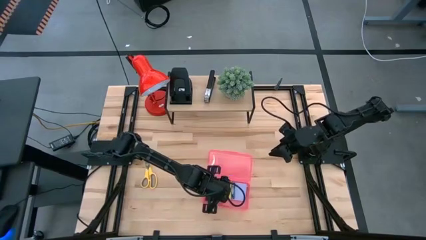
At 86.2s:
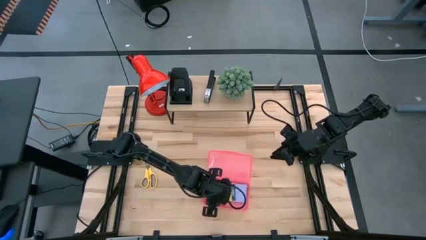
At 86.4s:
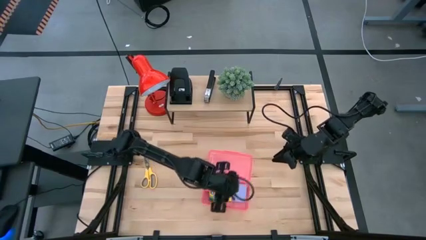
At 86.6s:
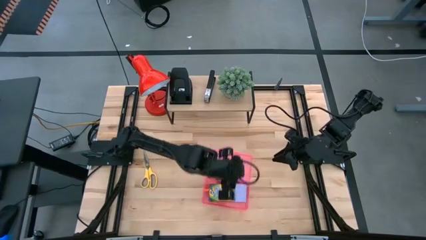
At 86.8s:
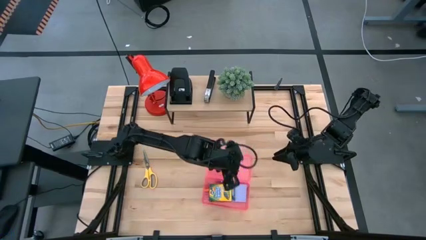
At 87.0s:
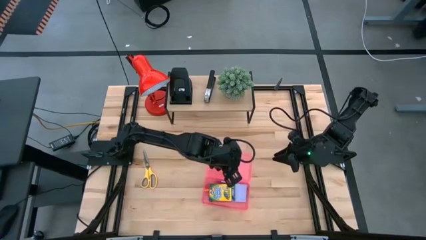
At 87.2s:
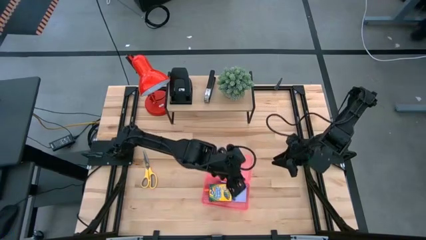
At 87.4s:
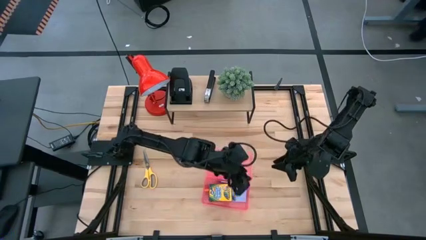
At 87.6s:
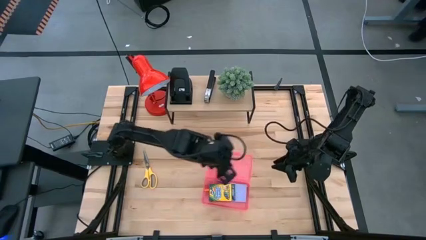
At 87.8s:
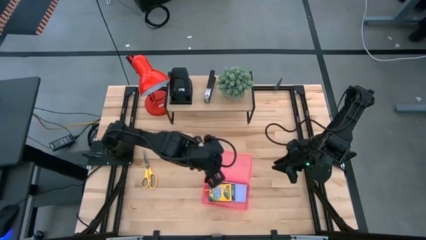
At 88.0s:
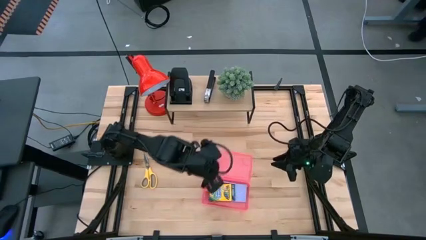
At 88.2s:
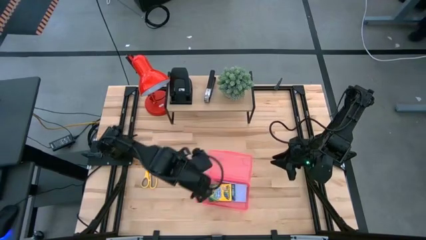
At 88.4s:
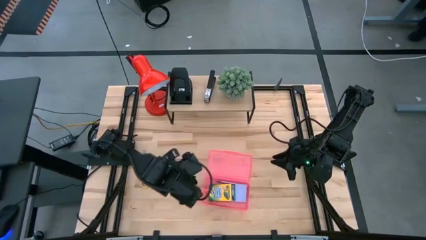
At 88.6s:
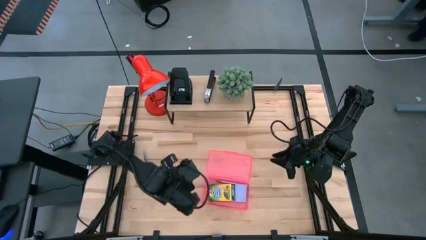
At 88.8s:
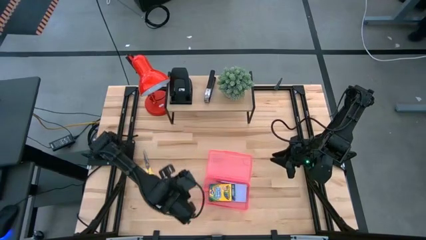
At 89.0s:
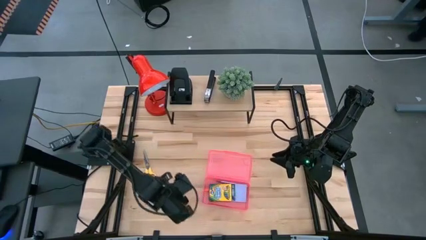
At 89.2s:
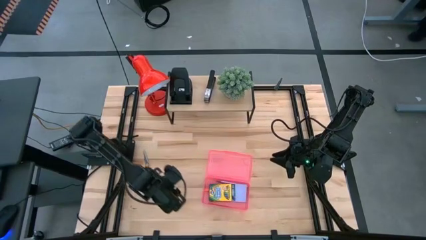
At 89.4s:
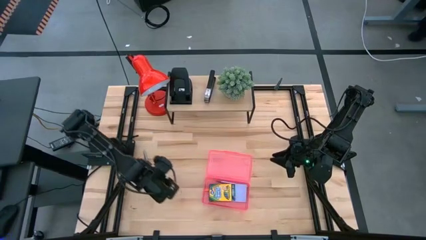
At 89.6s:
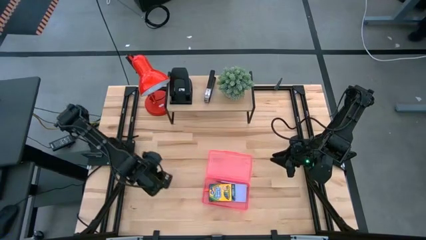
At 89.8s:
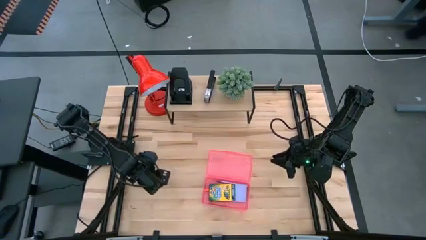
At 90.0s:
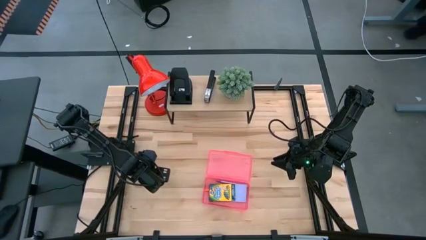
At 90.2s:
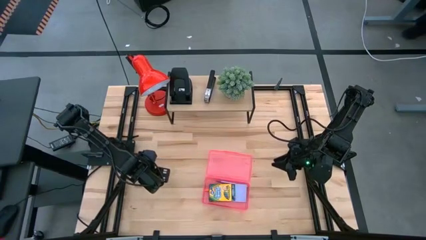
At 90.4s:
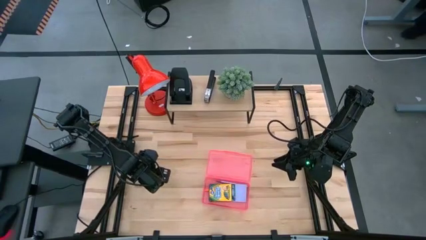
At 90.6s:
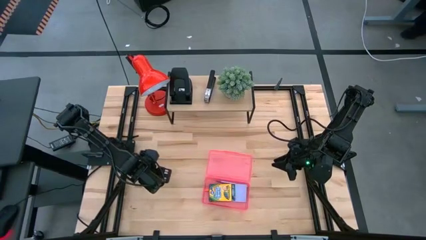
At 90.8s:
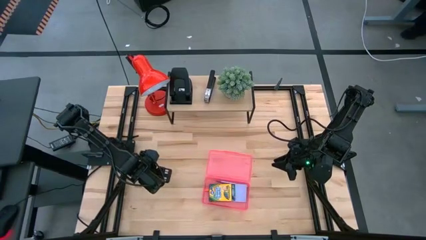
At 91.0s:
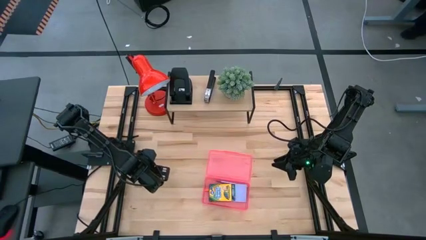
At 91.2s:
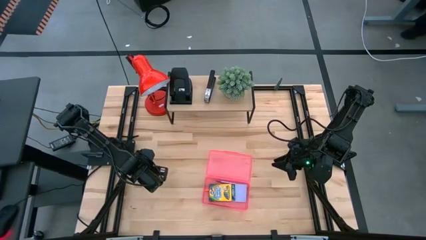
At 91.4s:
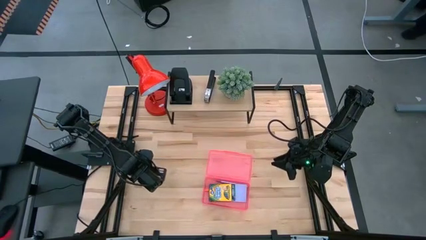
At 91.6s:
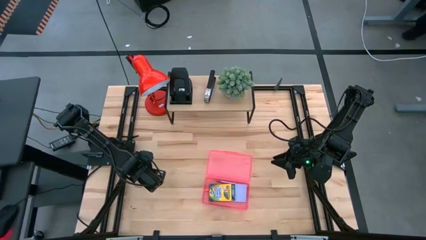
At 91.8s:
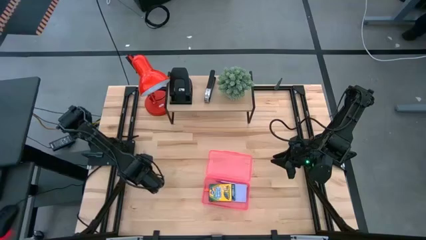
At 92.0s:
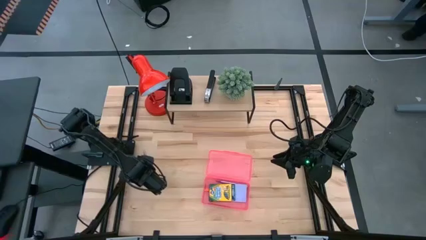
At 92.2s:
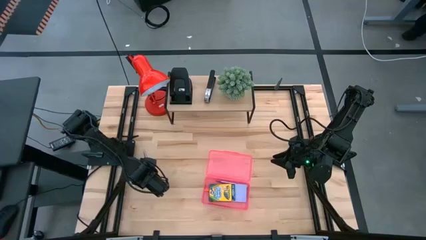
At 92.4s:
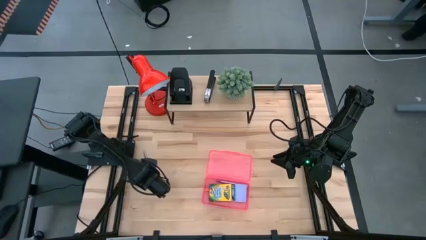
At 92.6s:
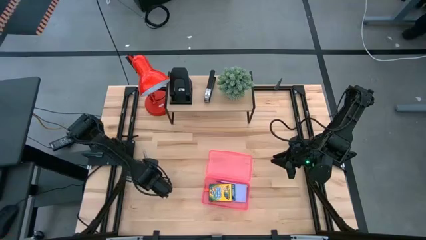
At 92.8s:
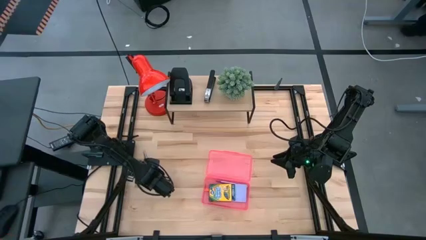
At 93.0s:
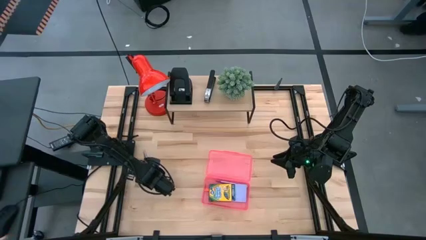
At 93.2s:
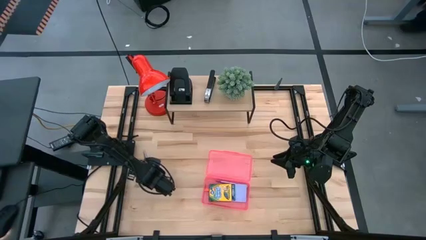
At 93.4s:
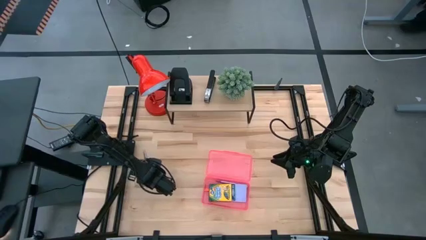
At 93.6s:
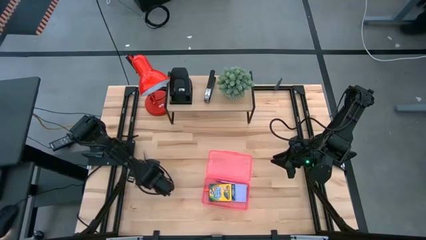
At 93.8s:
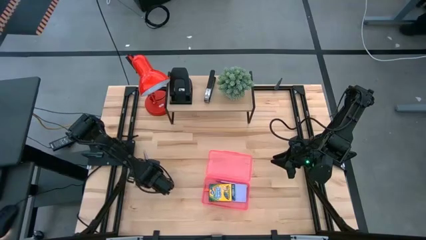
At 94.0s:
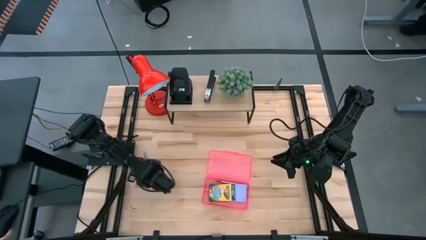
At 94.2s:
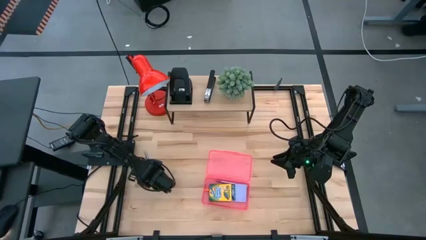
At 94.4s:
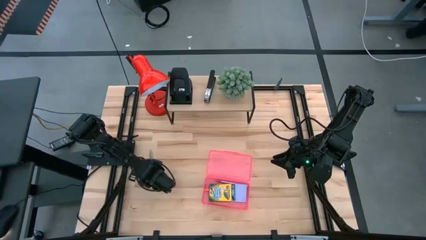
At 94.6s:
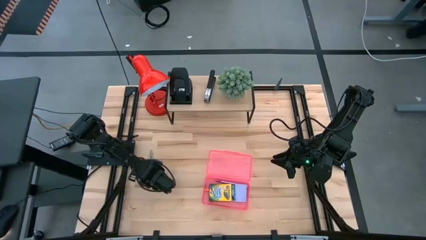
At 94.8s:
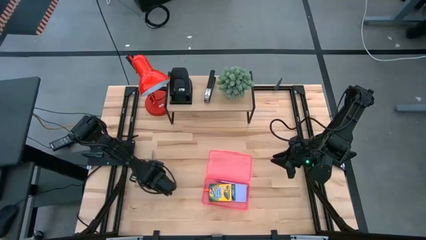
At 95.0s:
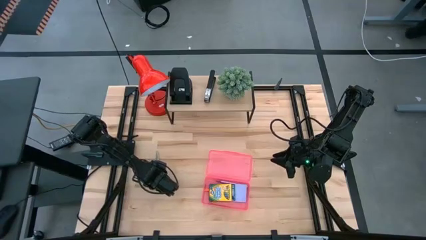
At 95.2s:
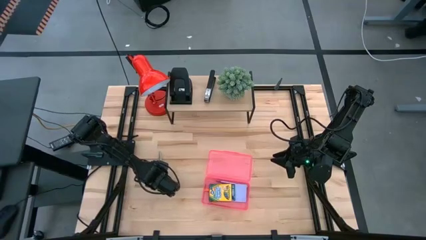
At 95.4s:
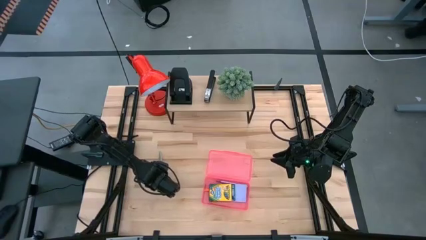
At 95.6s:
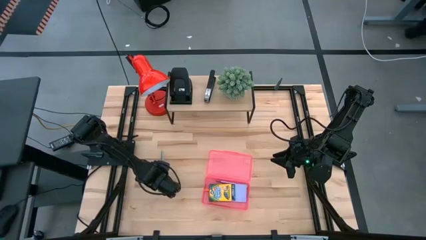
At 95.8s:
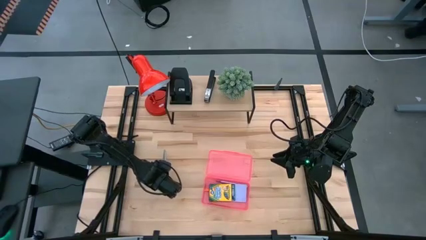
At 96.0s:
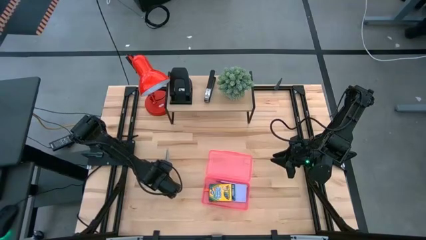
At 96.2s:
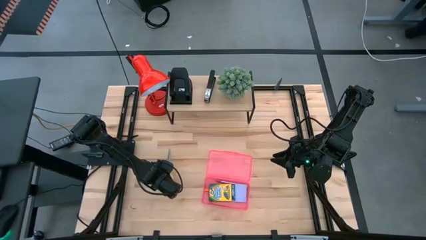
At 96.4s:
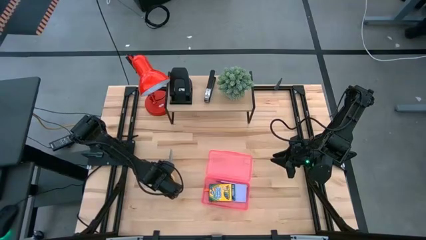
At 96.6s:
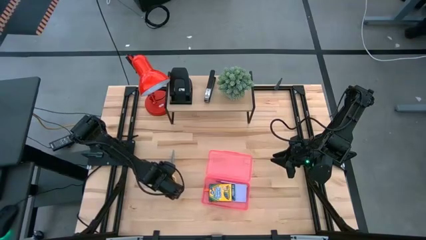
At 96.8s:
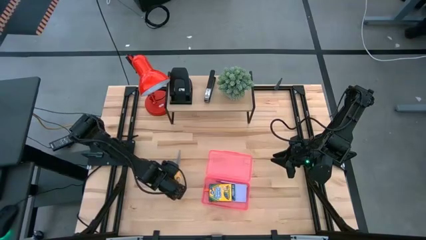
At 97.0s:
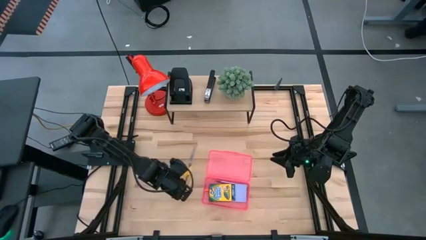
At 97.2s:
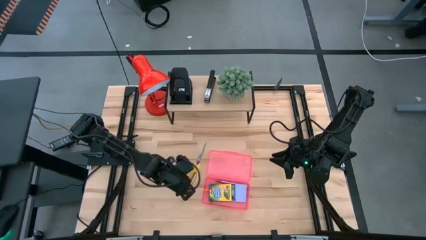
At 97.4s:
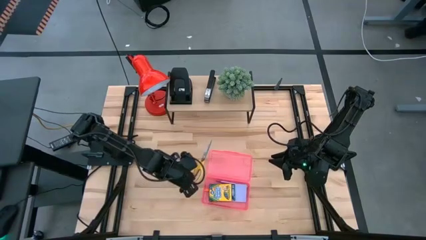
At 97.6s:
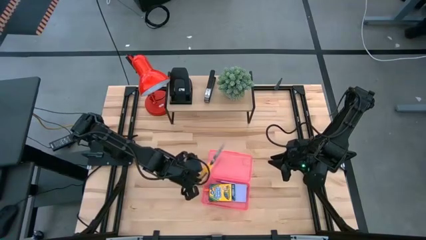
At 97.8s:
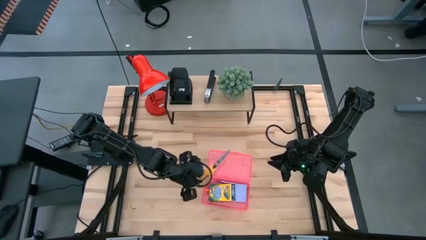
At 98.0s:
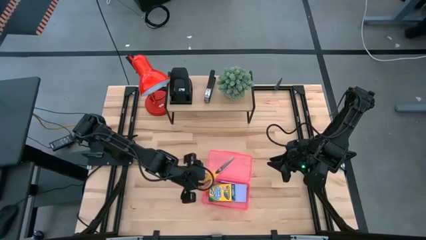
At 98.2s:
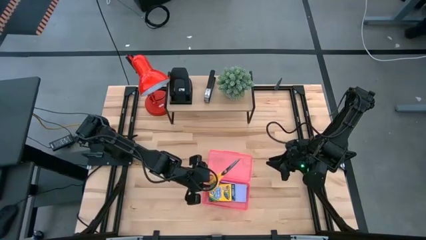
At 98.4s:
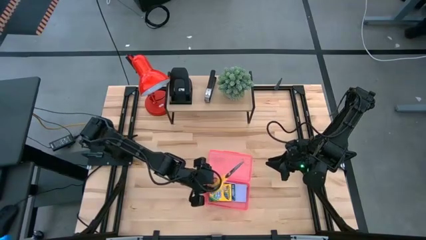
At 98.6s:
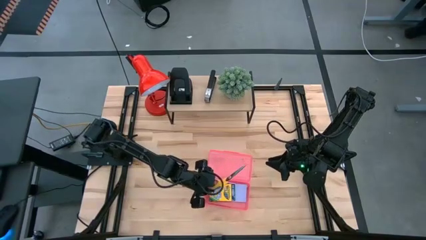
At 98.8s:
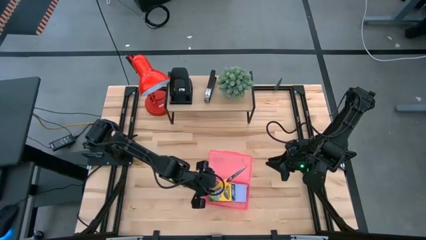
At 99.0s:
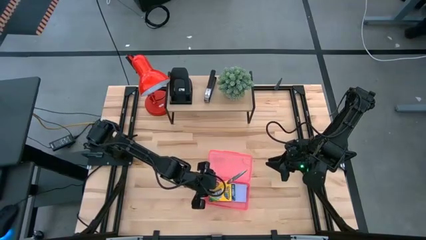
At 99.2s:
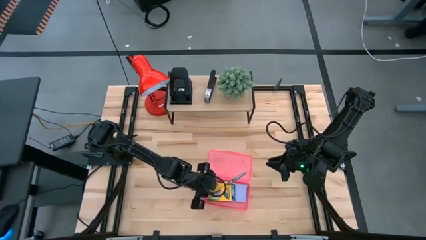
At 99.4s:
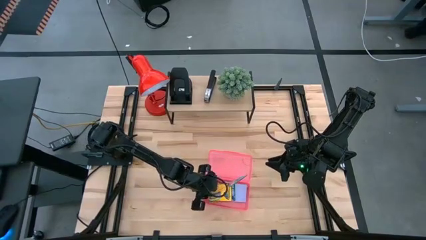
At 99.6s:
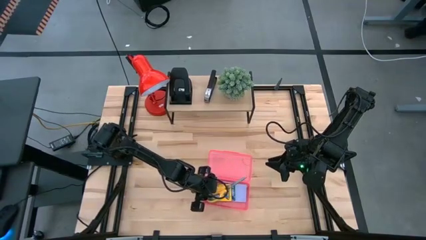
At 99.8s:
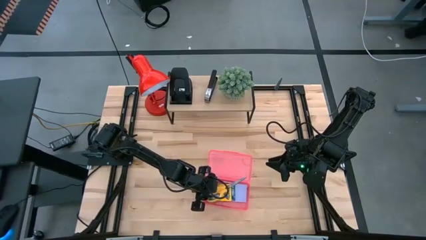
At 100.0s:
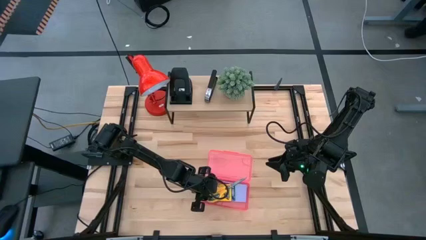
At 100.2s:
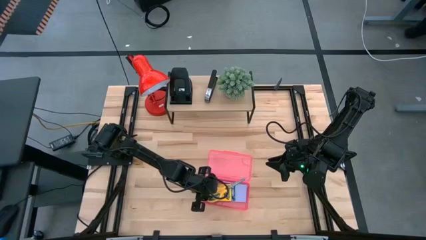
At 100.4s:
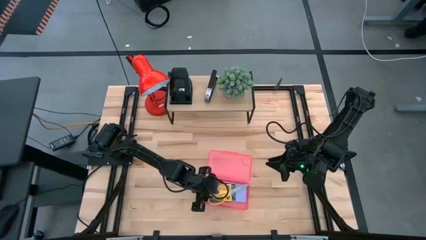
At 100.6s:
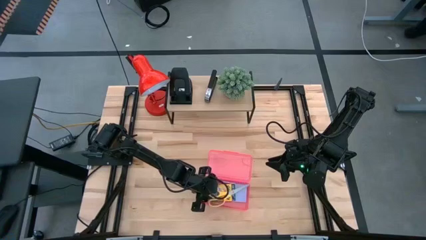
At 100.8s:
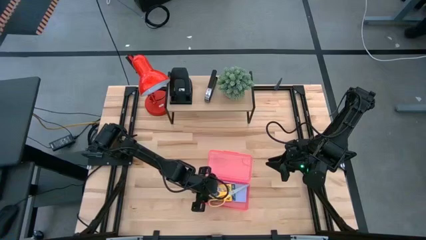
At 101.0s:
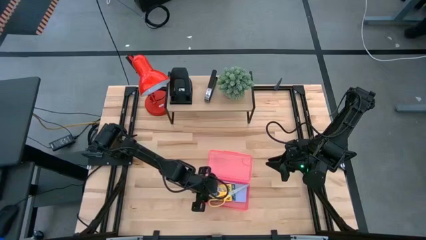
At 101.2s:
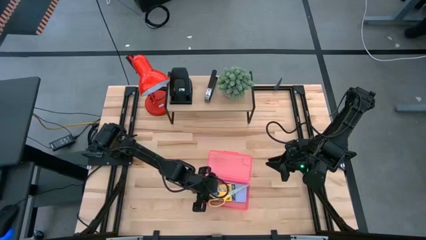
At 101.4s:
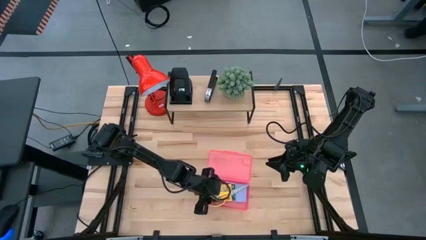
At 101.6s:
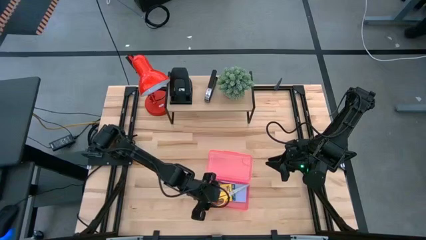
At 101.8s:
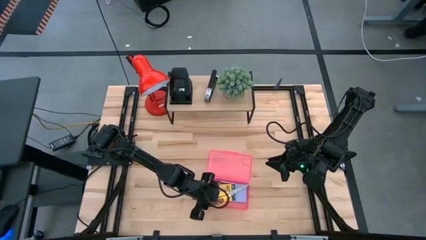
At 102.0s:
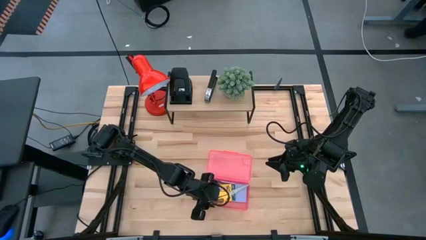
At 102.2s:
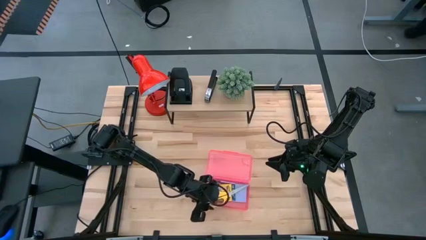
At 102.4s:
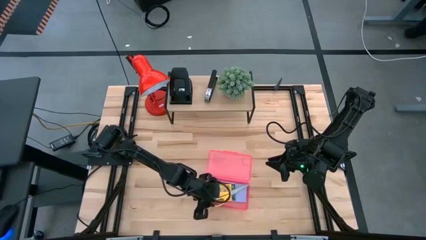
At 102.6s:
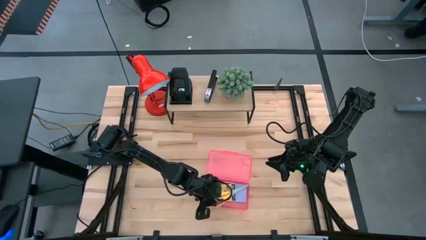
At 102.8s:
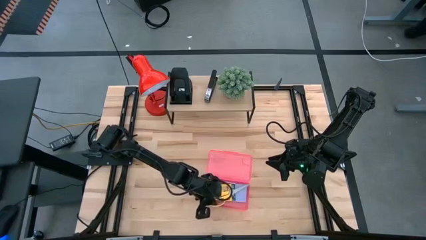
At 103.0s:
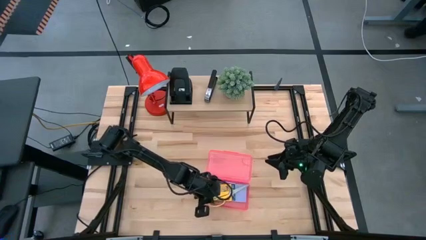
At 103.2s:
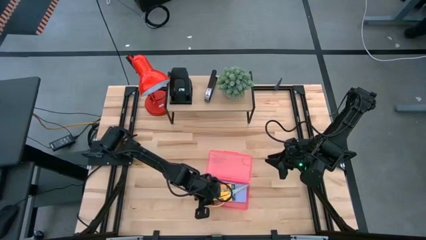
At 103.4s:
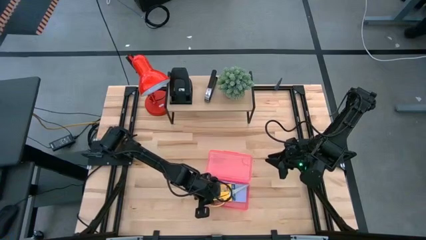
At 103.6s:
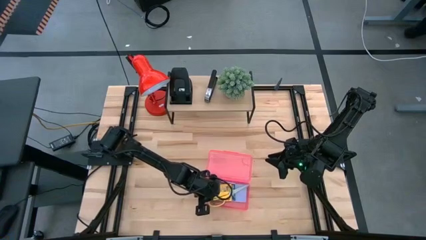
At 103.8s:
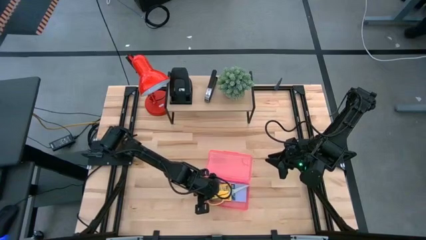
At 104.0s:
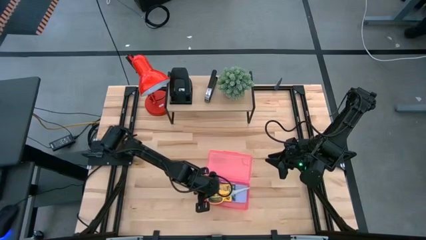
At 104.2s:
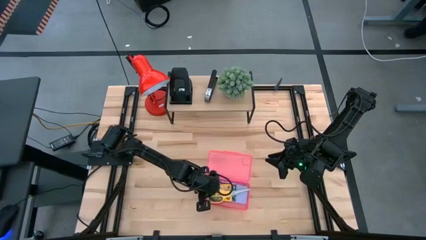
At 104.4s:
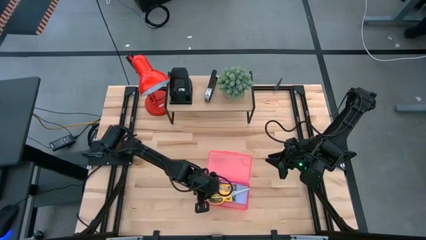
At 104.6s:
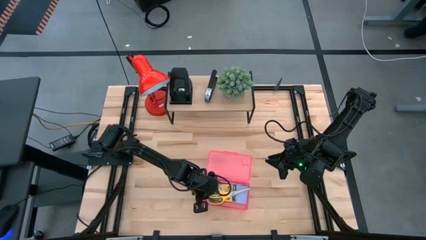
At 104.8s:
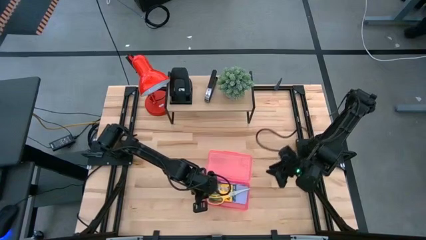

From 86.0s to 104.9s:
Task: Pack school essentials
Put the yellow scissors into the pink supply box
